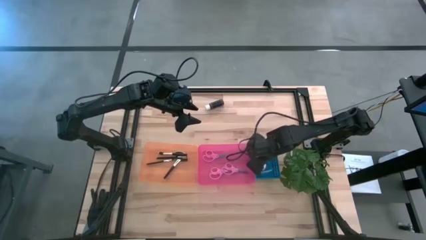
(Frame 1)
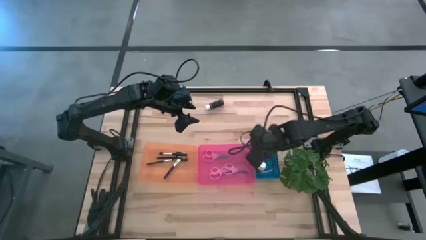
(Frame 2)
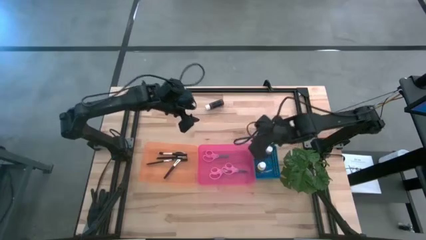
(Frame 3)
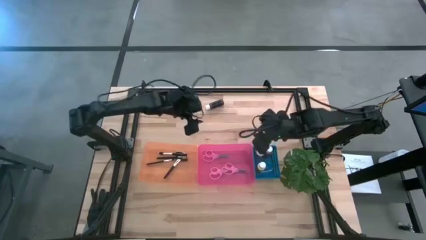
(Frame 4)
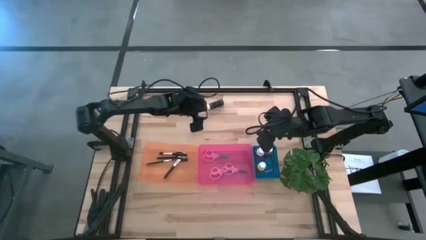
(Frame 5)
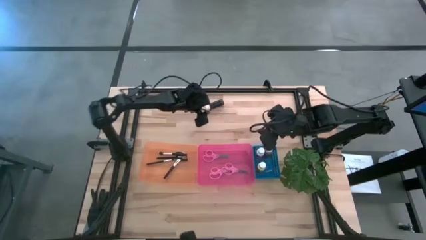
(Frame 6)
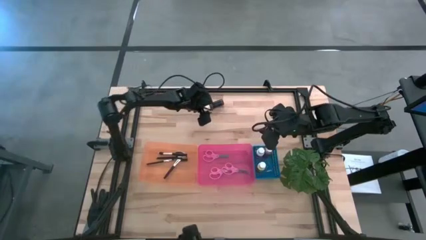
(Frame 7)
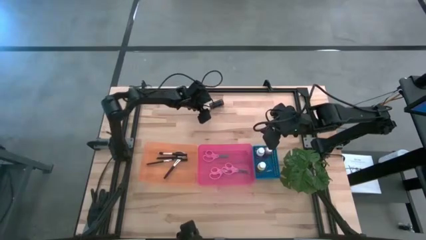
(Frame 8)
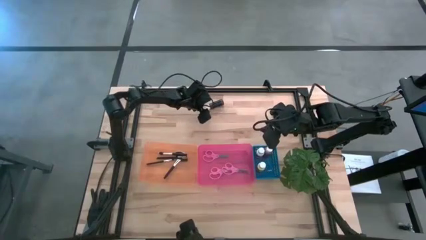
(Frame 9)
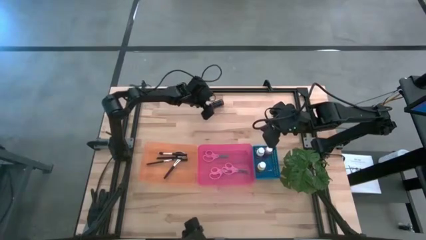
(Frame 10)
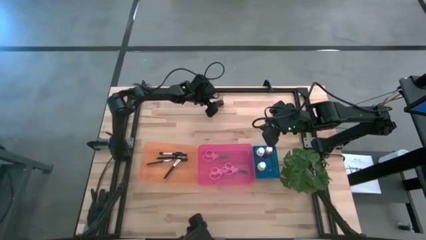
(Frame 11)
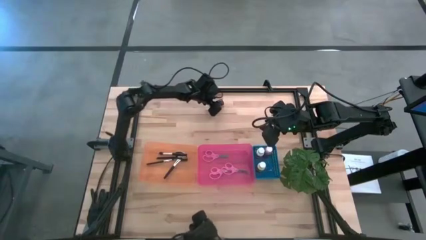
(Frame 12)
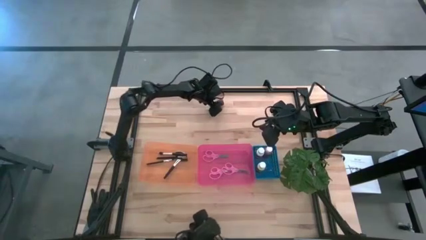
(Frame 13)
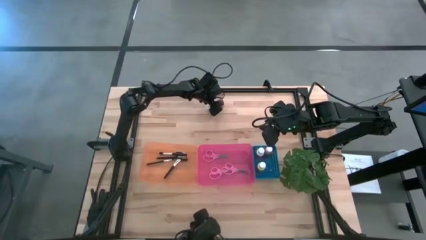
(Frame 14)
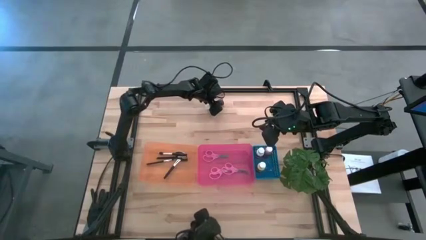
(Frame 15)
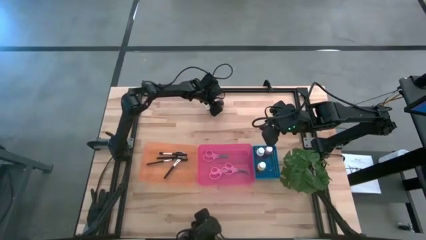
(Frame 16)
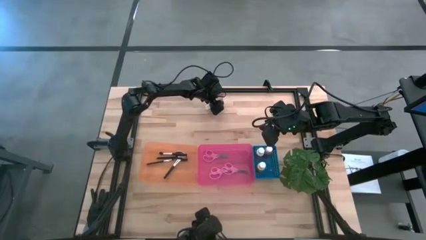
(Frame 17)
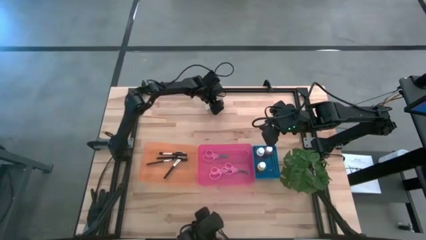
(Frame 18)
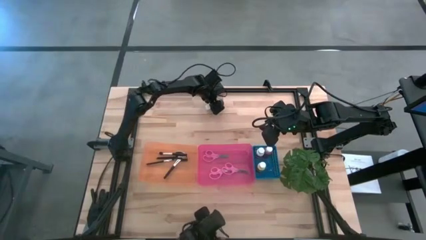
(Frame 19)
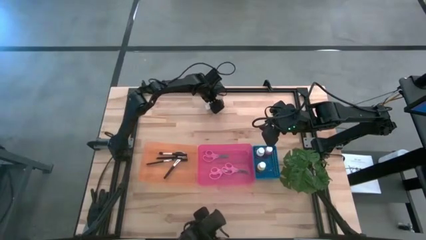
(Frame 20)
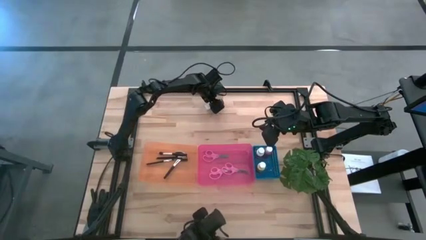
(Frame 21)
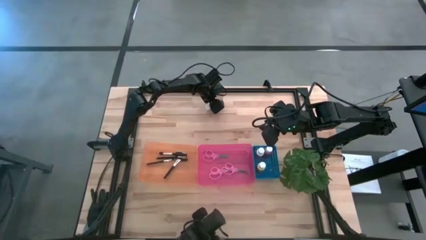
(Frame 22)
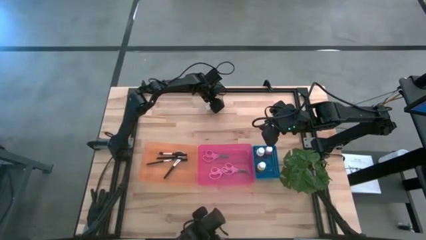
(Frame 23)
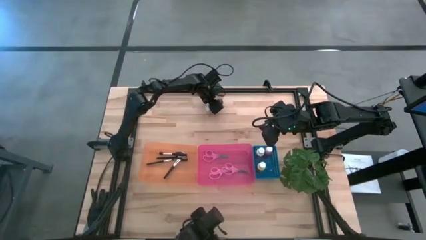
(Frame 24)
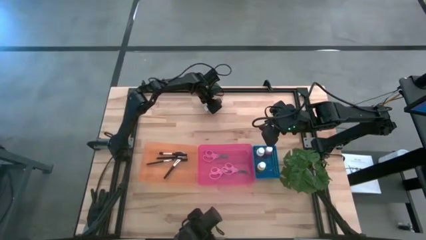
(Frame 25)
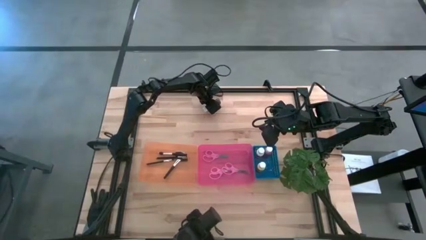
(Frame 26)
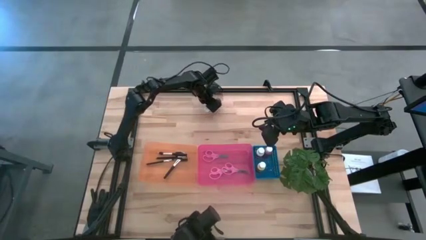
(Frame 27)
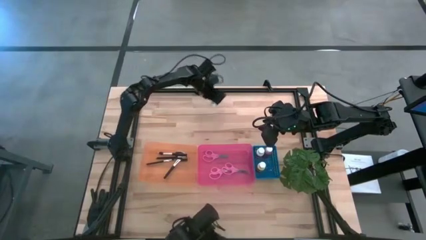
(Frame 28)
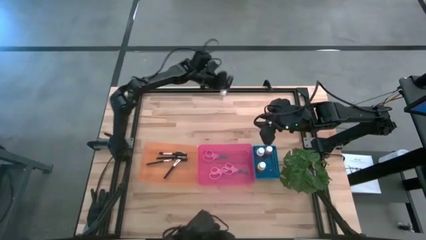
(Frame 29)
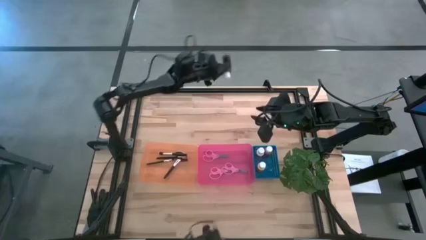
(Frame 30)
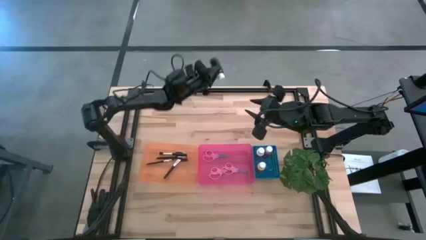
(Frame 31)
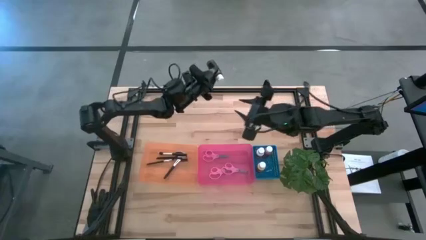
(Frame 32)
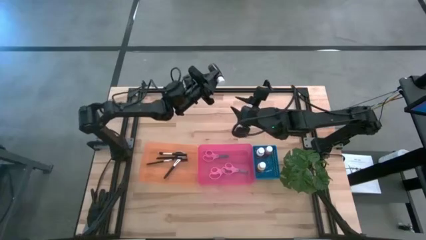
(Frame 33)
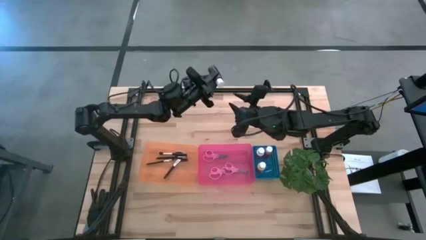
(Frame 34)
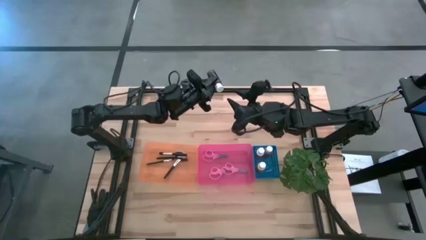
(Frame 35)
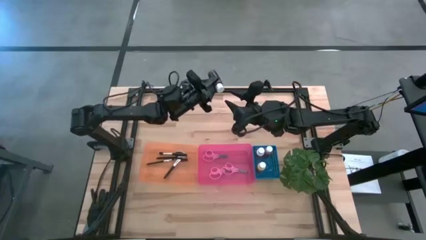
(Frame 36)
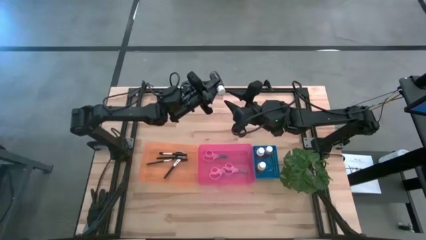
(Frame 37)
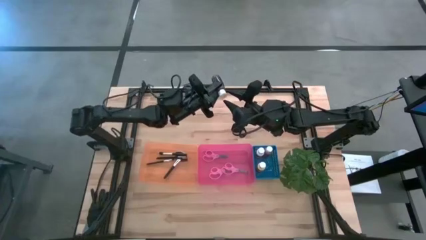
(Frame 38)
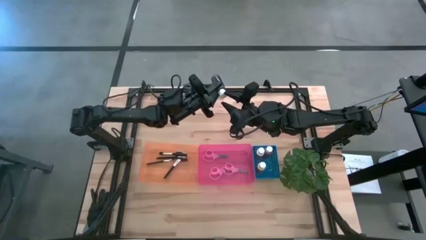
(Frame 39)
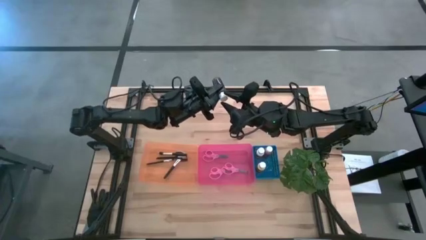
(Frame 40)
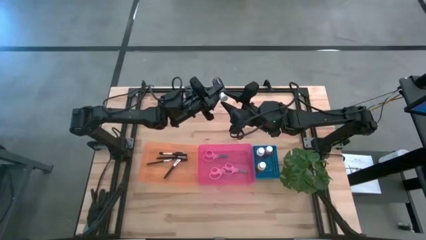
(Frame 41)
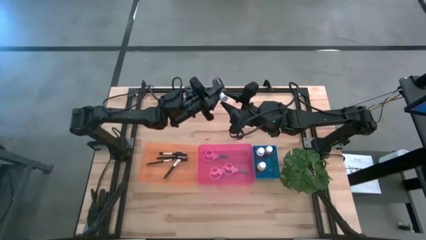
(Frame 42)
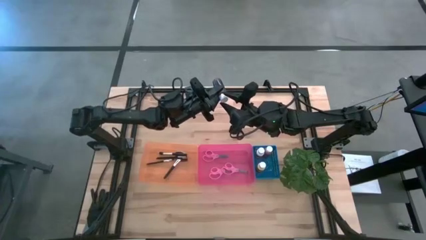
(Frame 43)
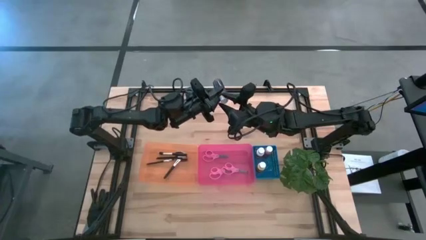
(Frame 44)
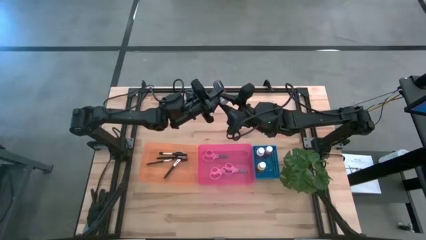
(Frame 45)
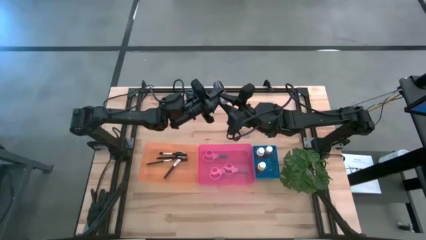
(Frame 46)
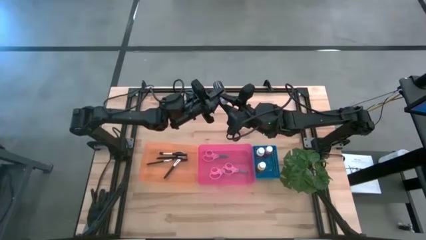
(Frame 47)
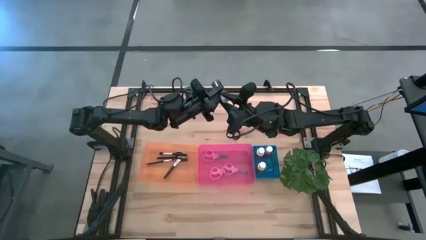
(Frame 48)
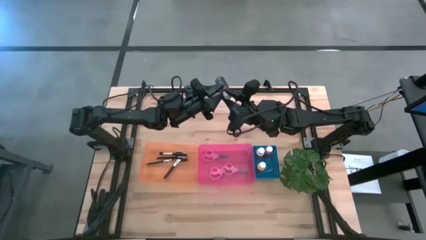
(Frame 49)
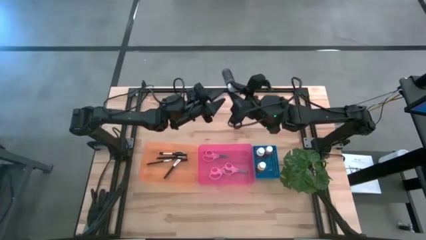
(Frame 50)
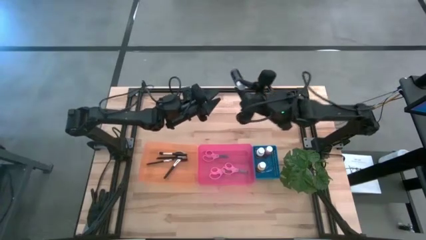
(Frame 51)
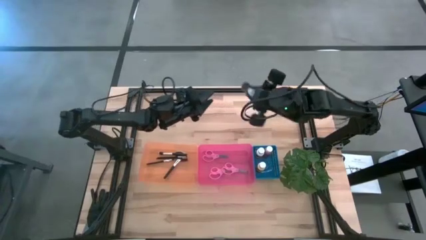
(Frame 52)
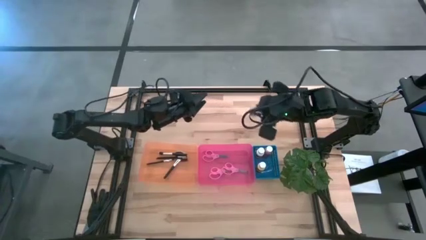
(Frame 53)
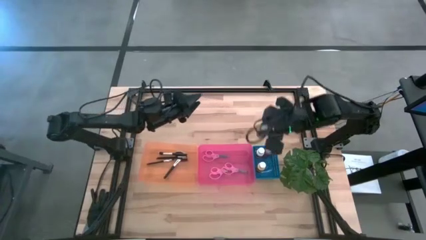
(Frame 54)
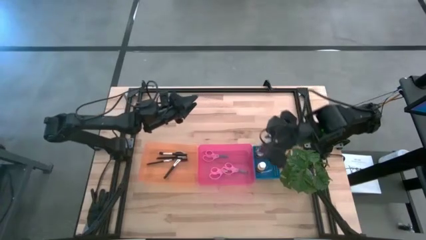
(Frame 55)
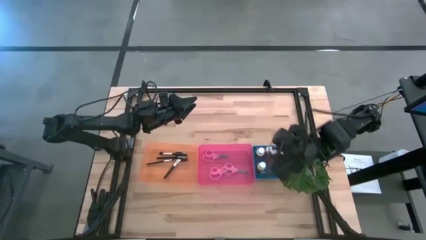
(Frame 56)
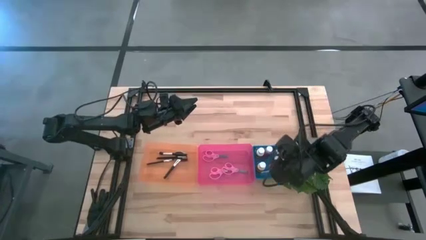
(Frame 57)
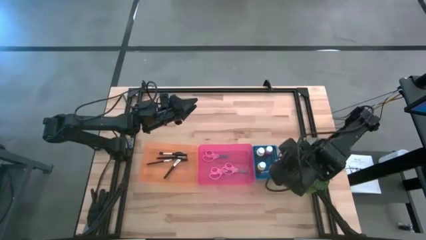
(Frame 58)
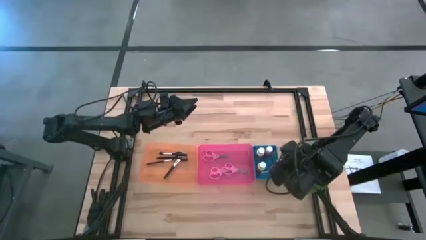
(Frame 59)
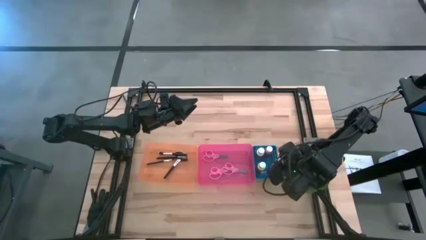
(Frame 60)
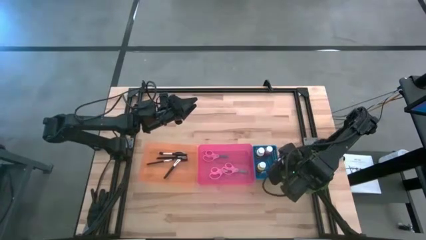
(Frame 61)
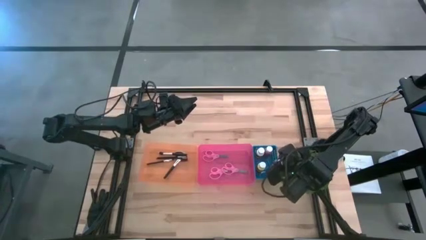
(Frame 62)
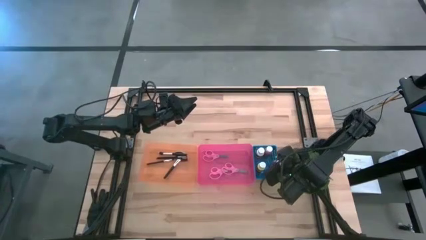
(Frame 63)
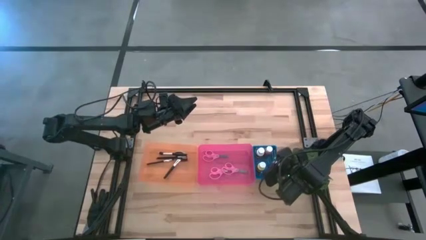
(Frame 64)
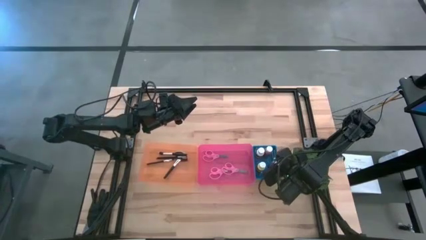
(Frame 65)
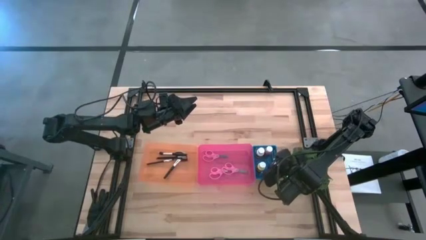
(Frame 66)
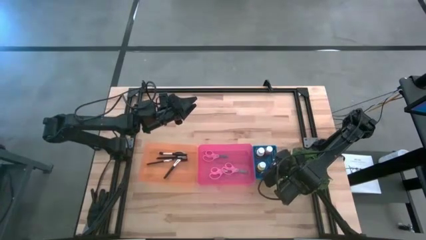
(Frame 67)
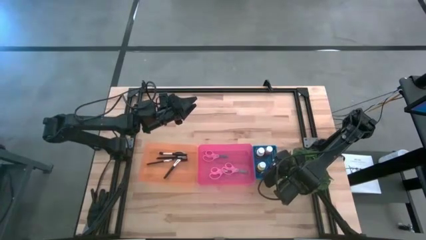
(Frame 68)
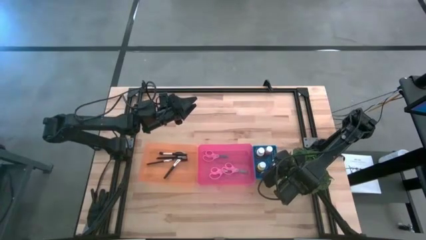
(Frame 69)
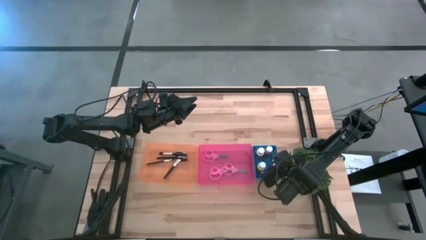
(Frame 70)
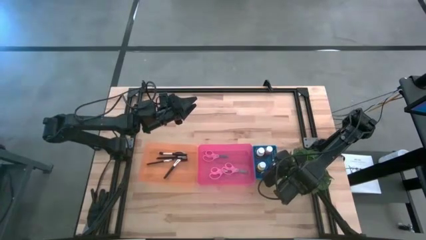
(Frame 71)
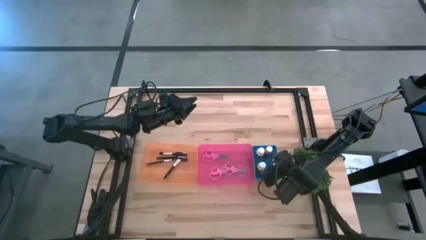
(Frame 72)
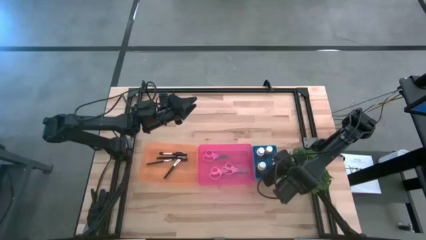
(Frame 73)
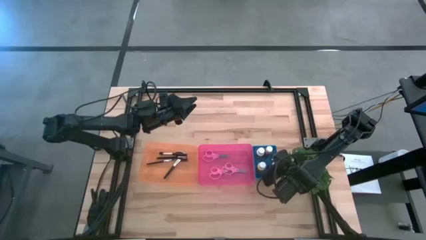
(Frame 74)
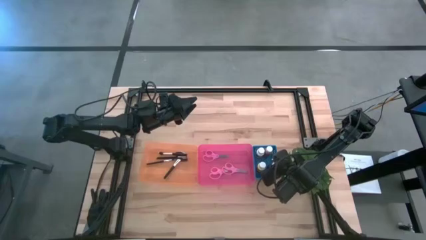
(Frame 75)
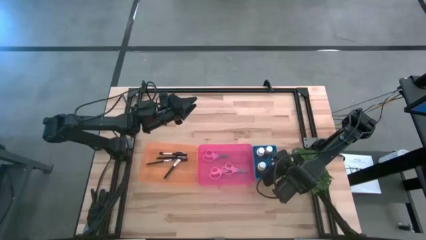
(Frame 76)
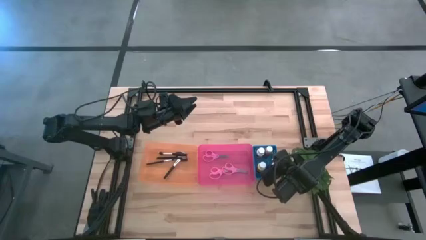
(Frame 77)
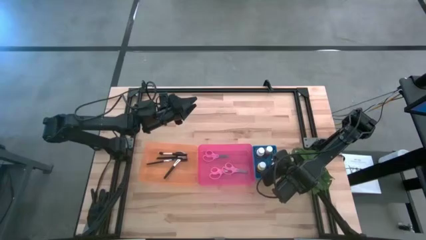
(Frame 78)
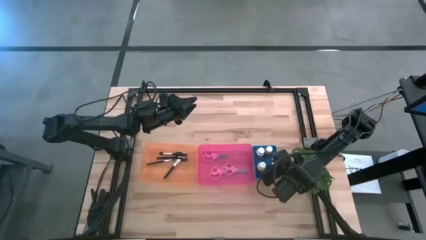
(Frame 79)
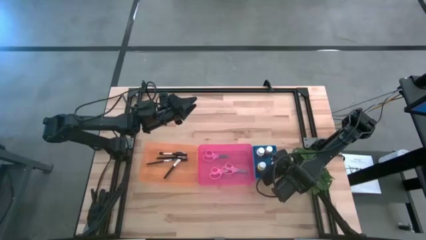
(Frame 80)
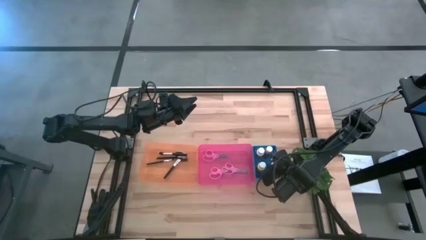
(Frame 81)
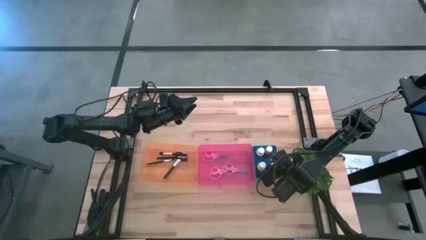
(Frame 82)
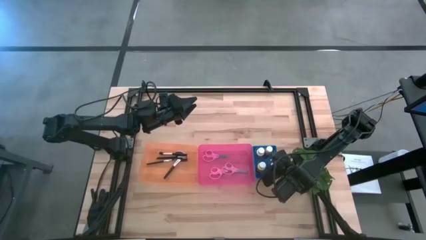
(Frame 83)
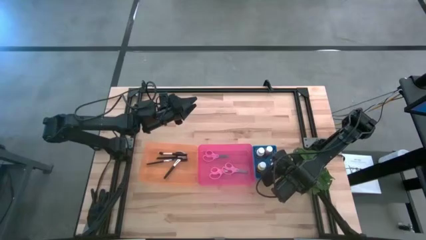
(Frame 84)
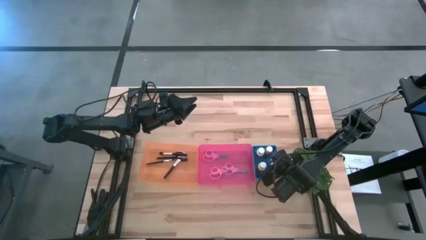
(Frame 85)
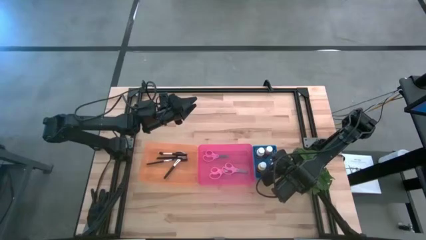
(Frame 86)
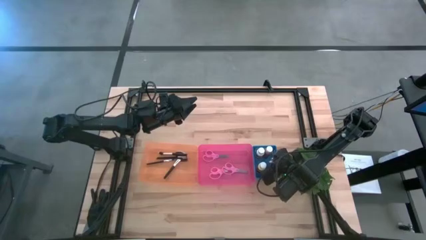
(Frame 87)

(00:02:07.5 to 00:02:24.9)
Task: Pick & Place Paint Supplies
Put the brown paint bottle into the blue bin
